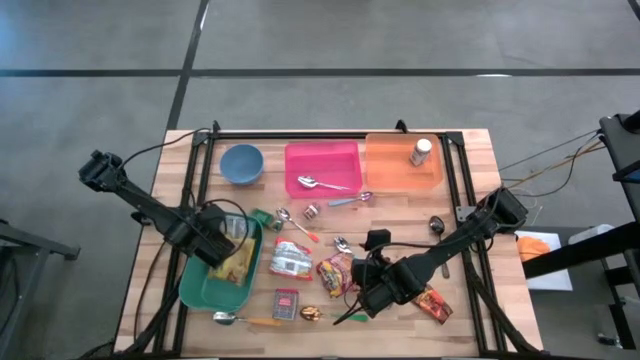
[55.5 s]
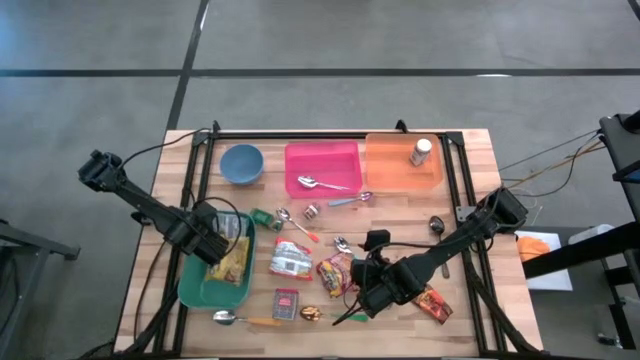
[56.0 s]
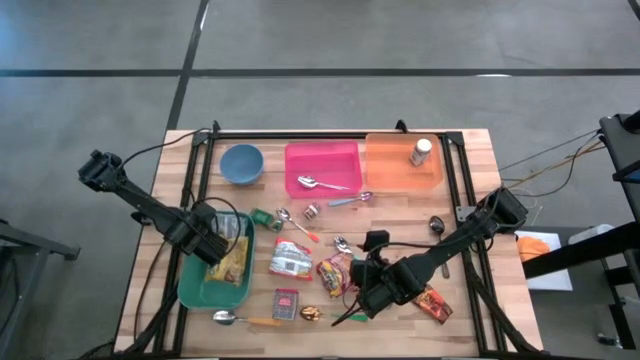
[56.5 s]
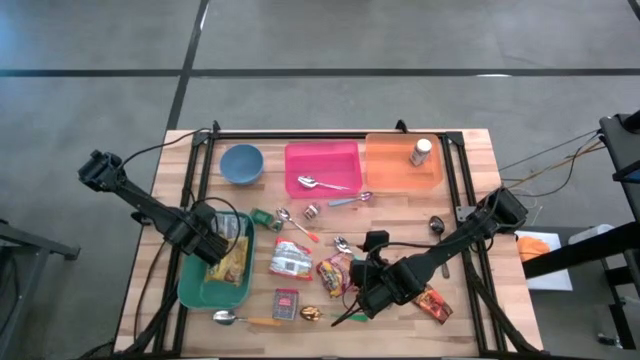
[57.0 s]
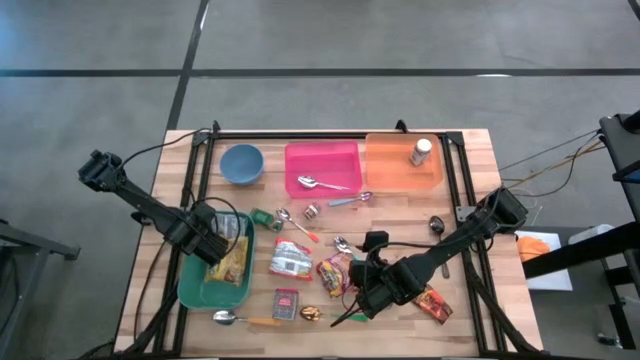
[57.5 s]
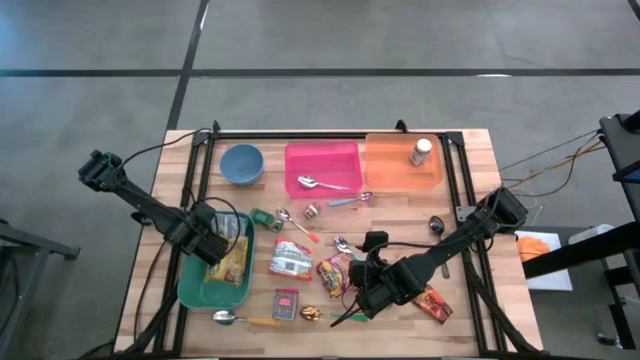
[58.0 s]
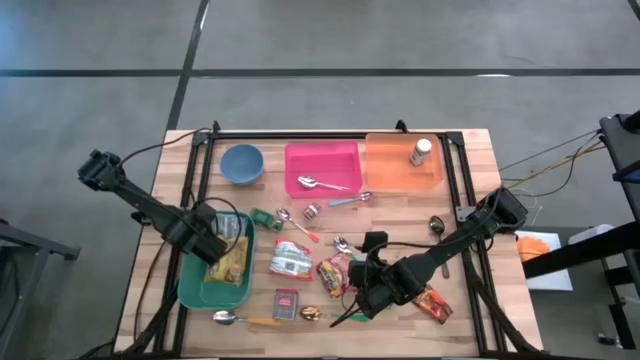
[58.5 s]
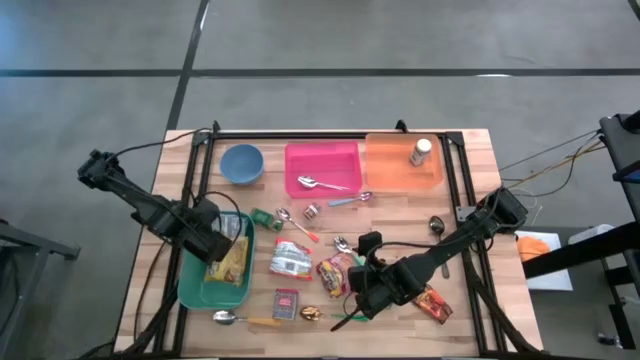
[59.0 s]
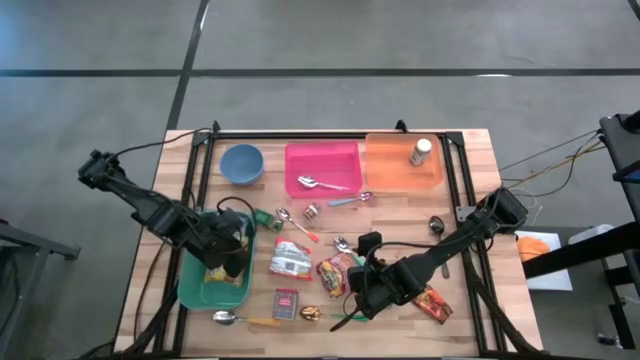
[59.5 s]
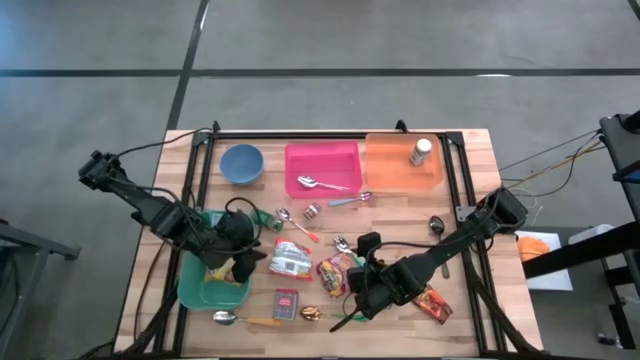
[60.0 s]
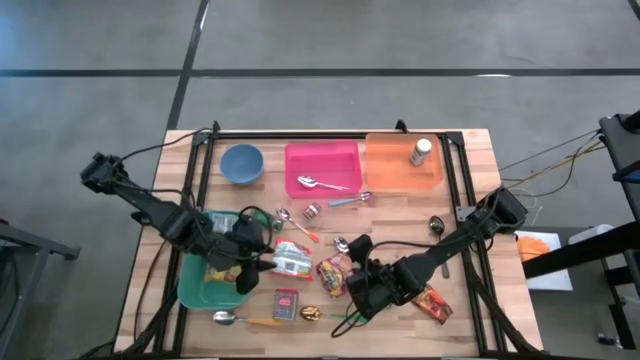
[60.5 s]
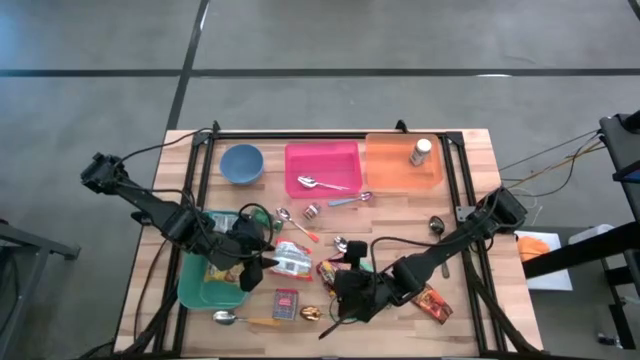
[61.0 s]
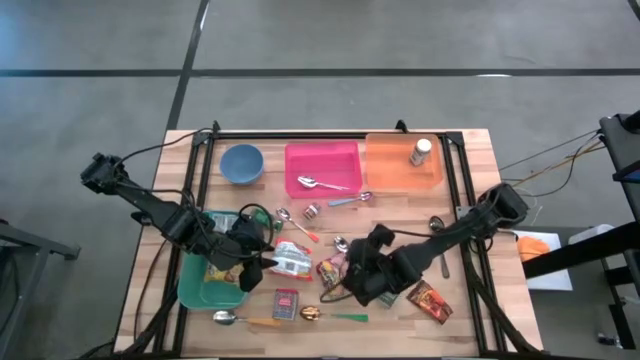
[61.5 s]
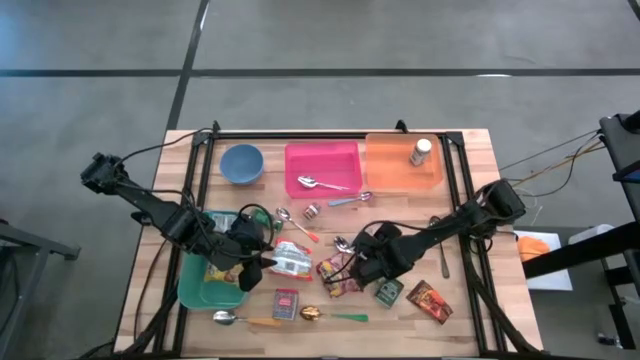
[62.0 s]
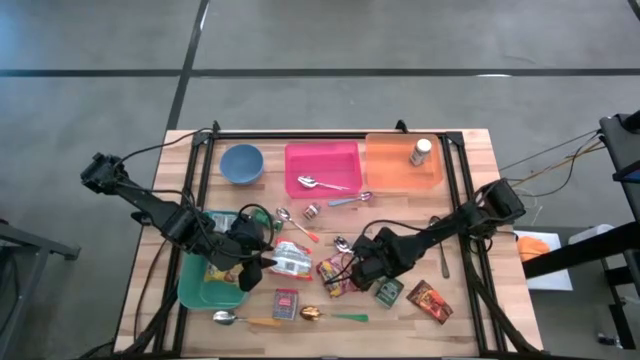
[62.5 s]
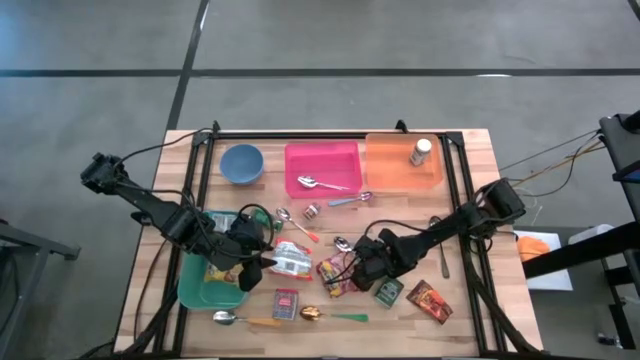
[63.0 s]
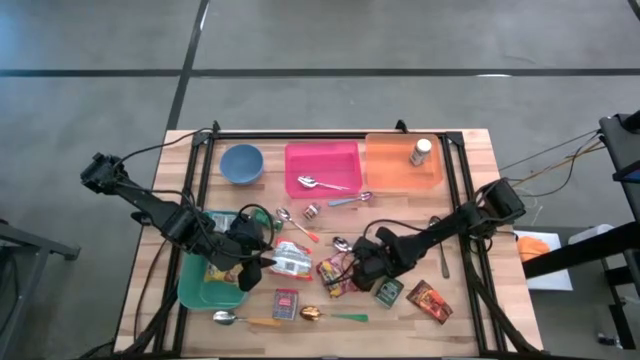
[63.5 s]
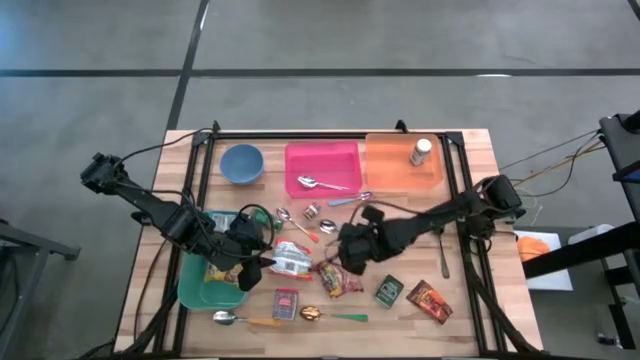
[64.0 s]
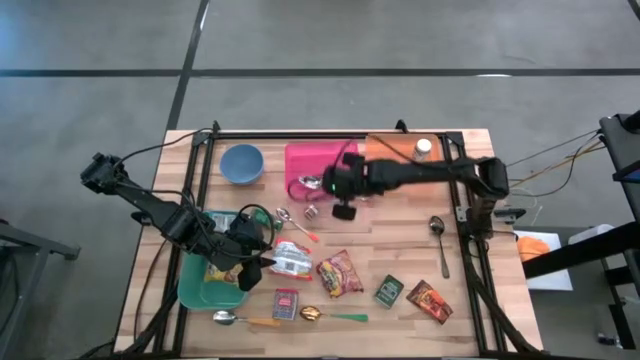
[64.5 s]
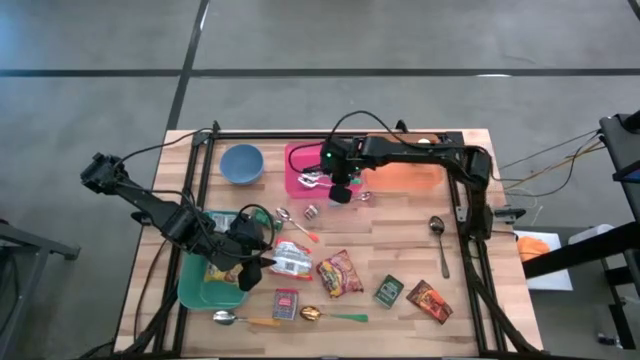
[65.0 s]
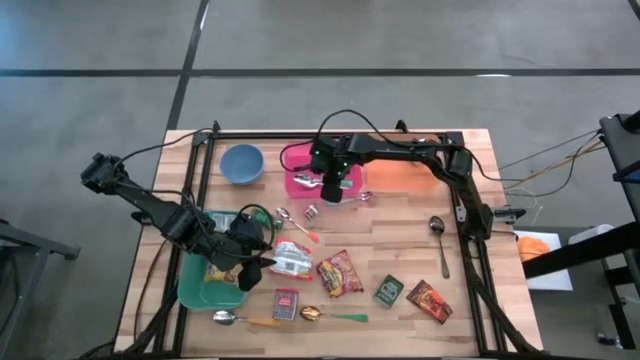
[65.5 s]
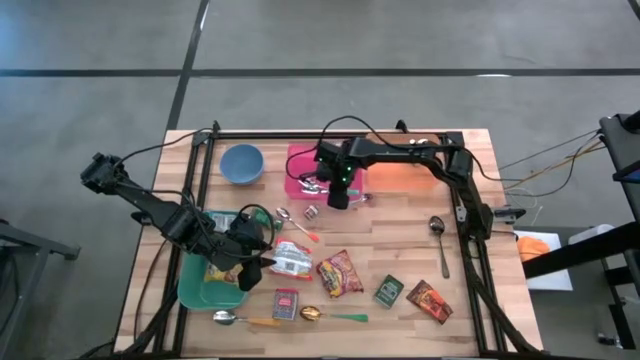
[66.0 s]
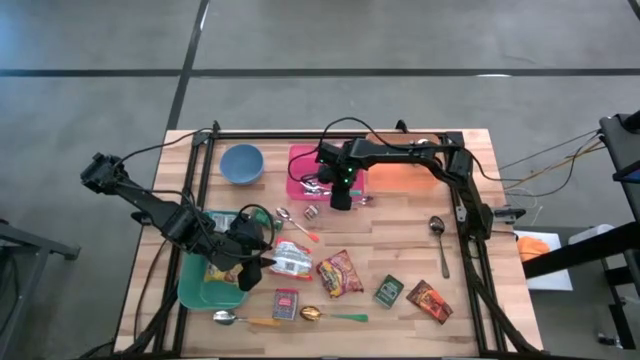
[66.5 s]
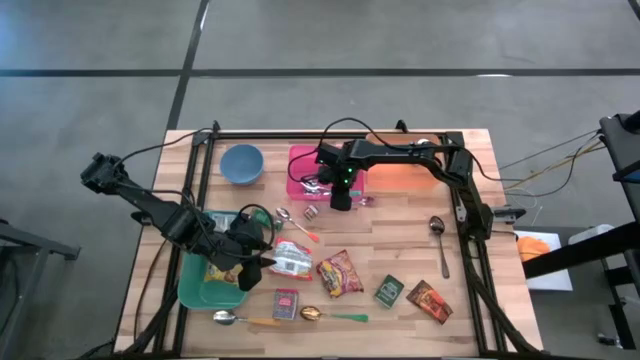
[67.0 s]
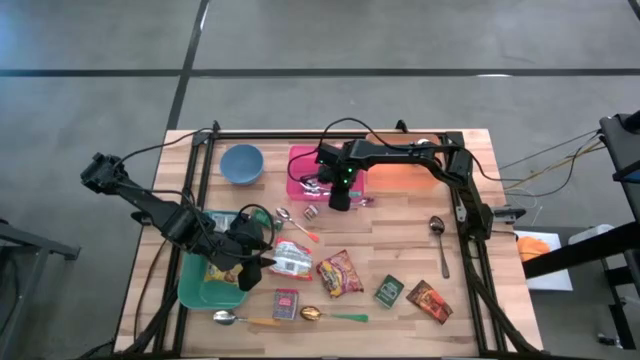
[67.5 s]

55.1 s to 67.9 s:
Put the light blue spoon into the pink bin

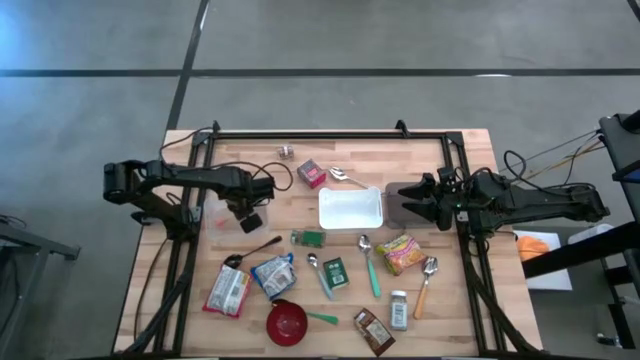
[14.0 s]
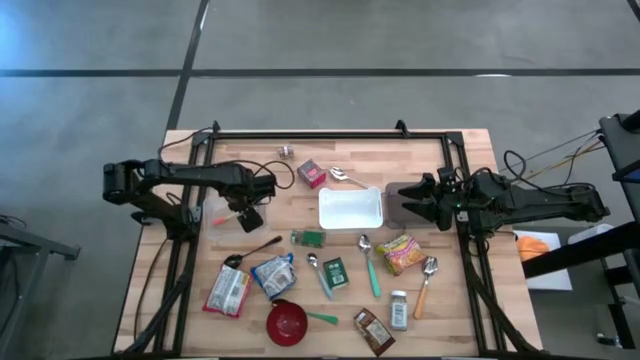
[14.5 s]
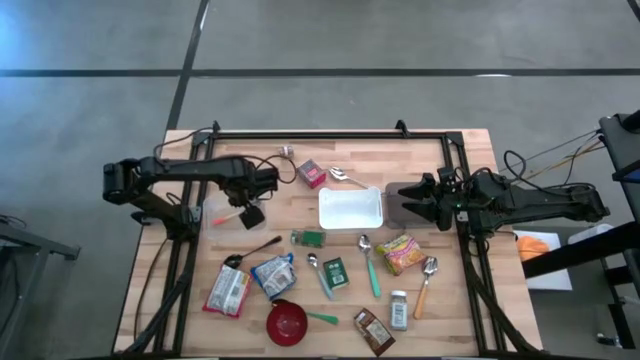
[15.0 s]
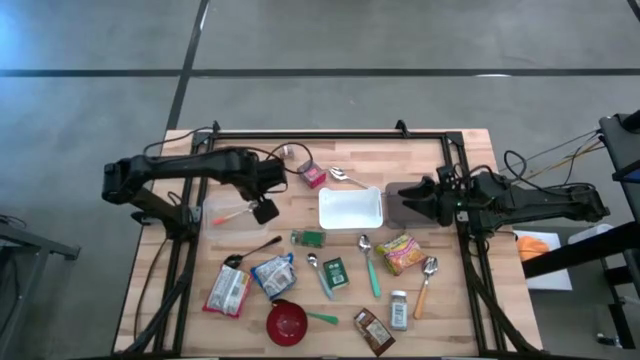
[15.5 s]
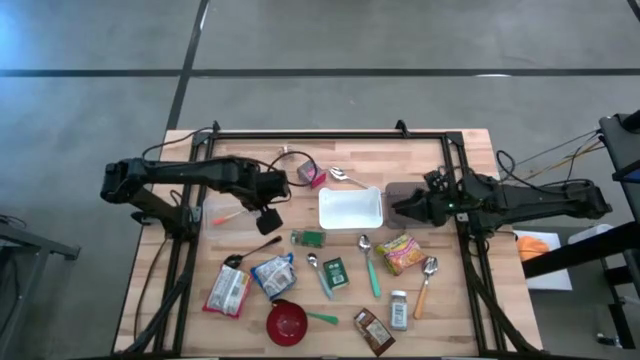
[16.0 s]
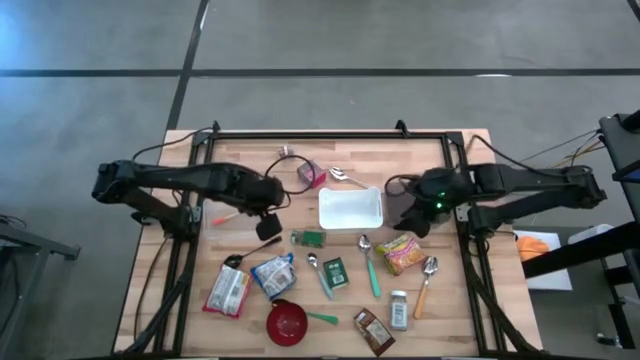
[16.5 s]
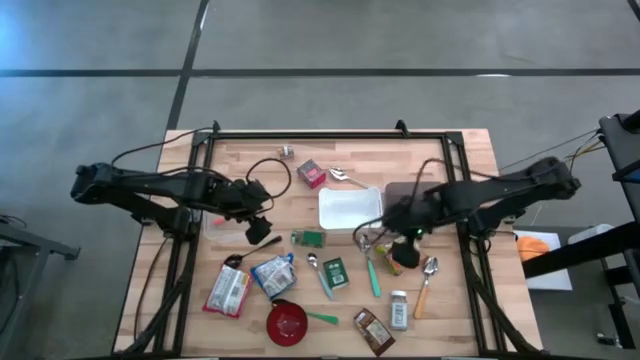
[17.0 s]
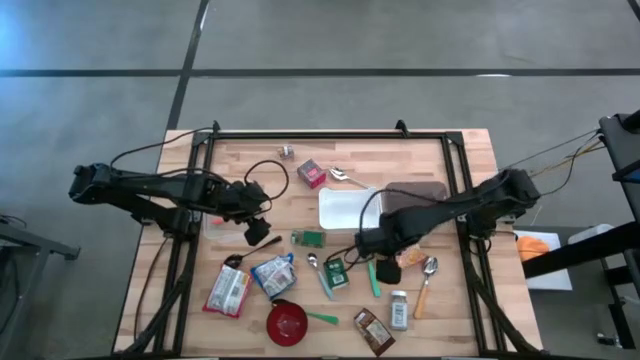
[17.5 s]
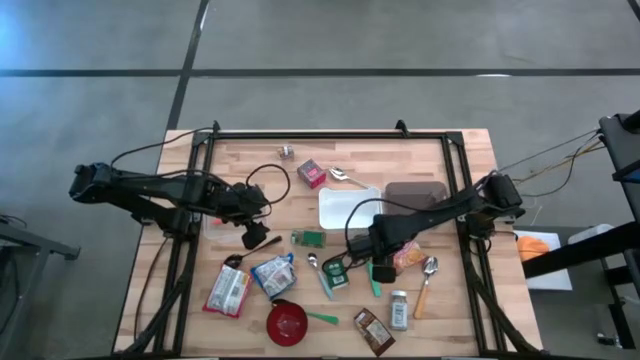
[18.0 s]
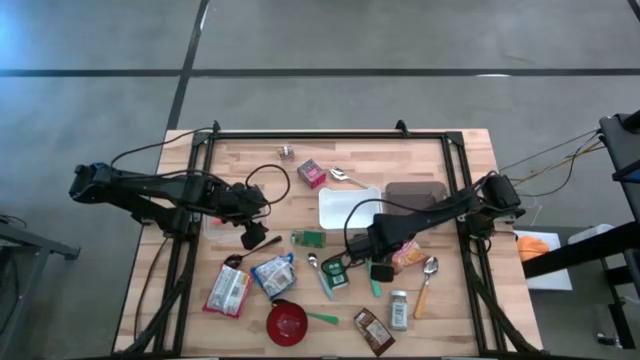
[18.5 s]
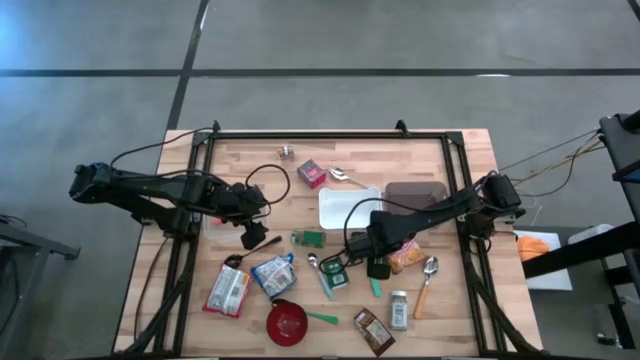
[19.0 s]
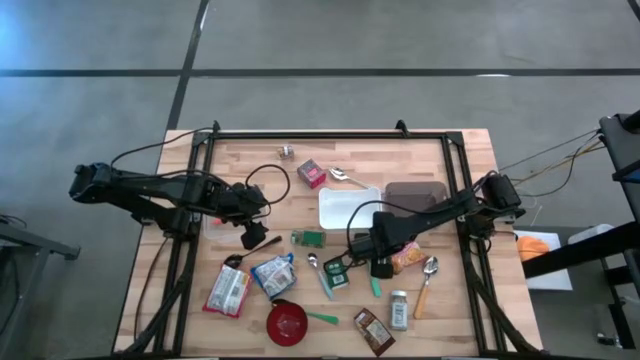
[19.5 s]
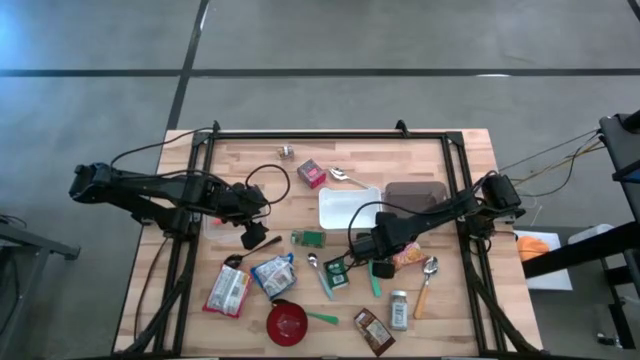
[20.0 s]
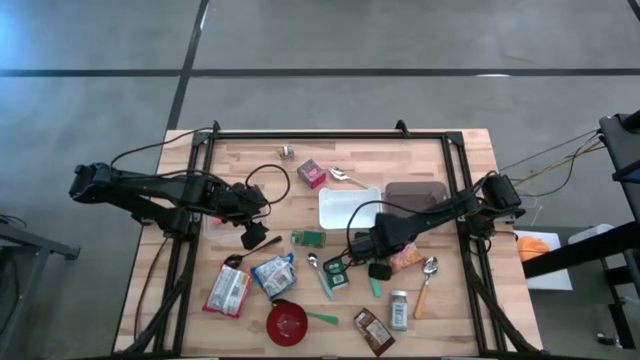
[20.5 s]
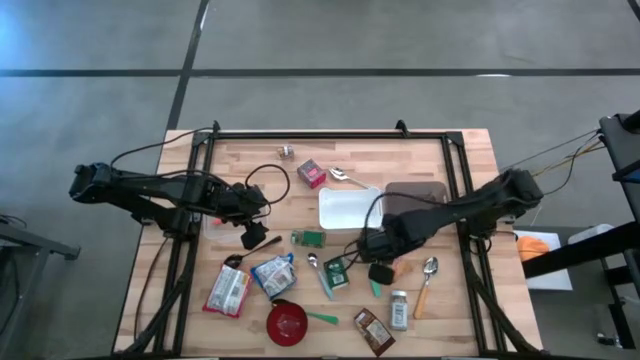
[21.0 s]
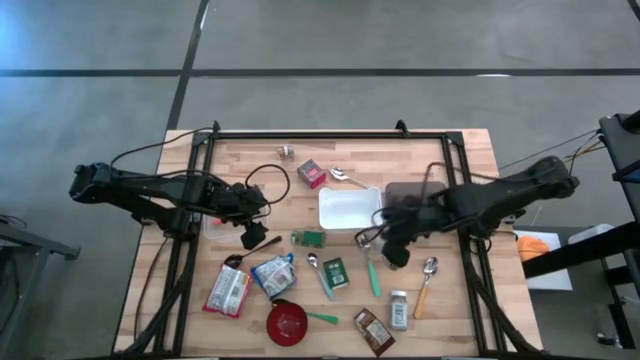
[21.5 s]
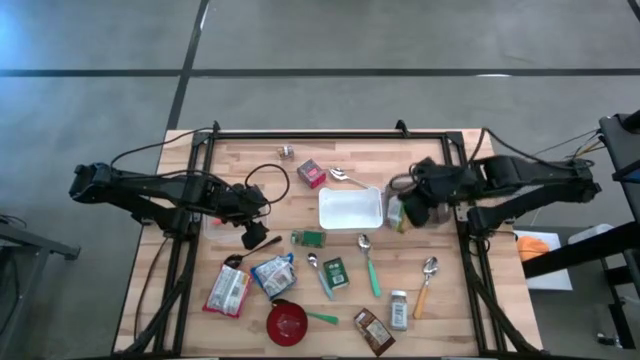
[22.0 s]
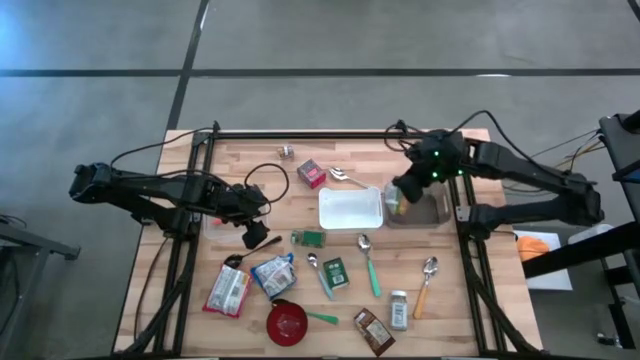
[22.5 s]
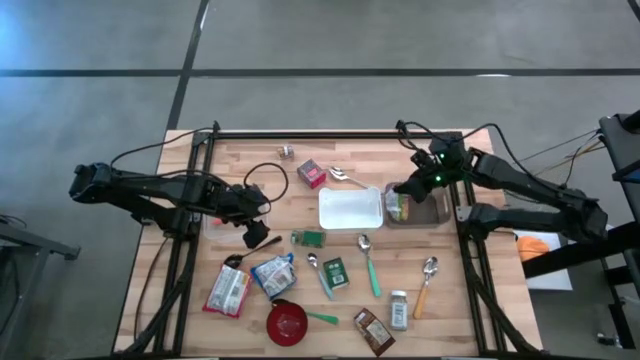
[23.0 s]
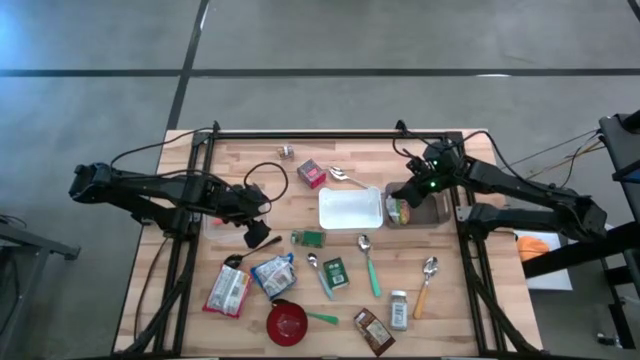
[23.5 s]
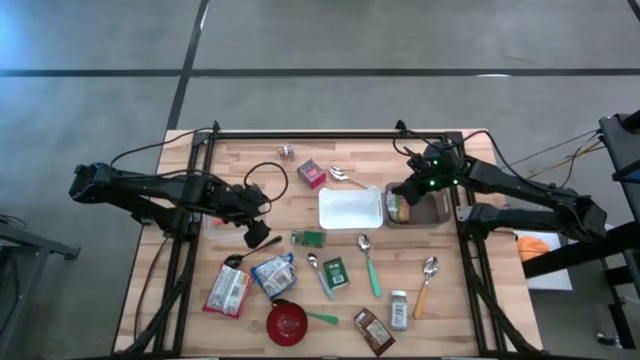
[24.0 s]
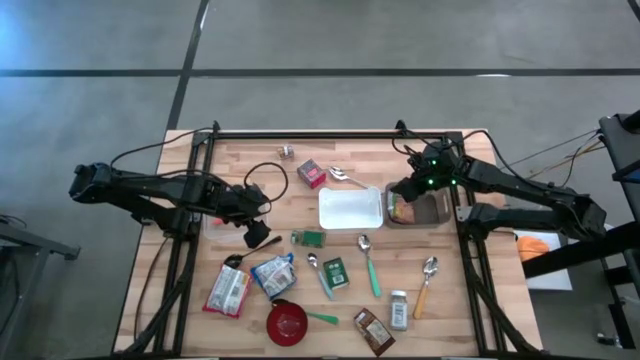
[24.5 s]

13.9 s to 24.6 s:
Put the green noodle pack into the black bin
